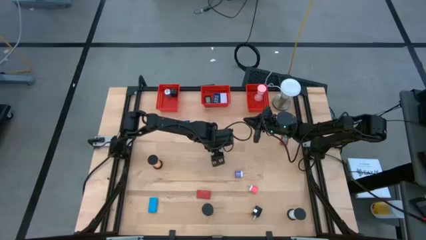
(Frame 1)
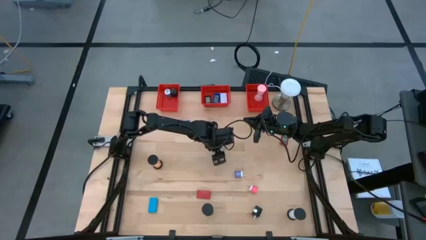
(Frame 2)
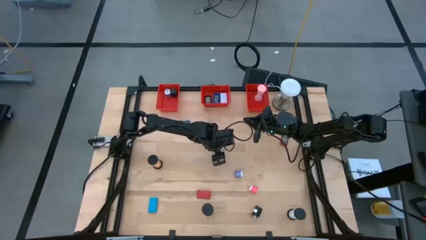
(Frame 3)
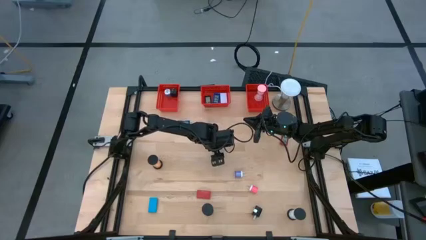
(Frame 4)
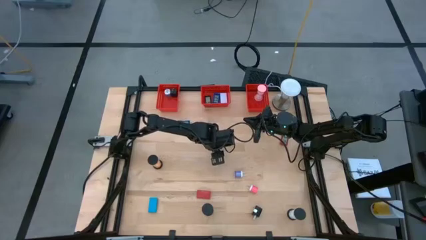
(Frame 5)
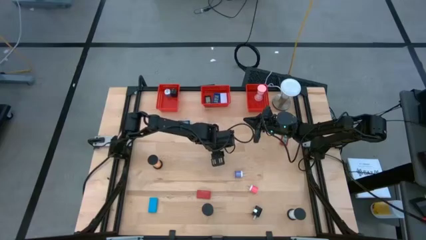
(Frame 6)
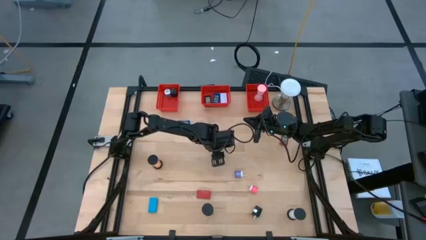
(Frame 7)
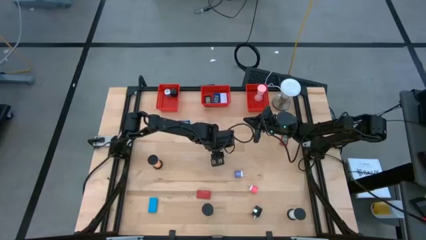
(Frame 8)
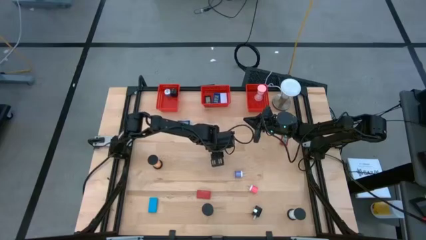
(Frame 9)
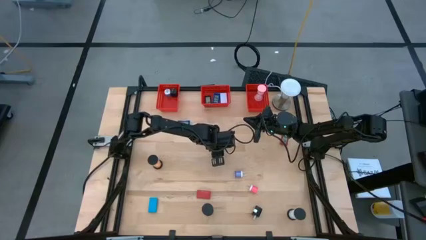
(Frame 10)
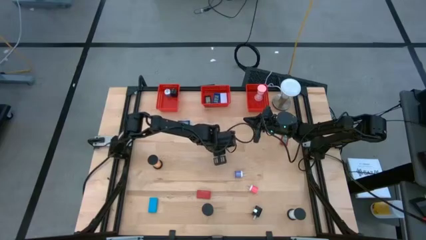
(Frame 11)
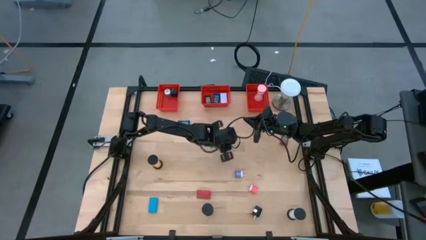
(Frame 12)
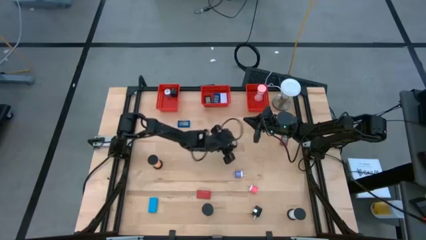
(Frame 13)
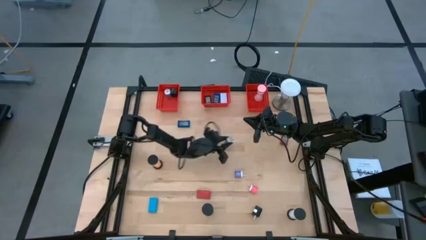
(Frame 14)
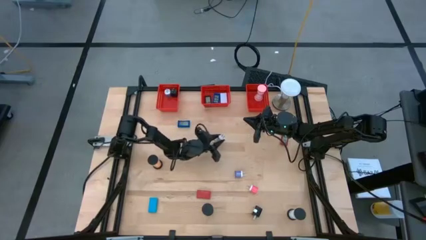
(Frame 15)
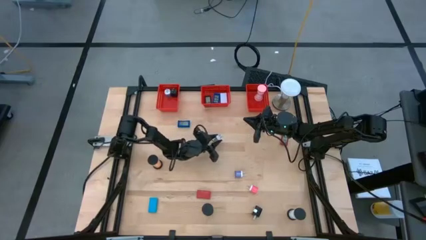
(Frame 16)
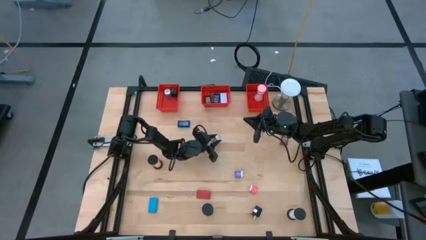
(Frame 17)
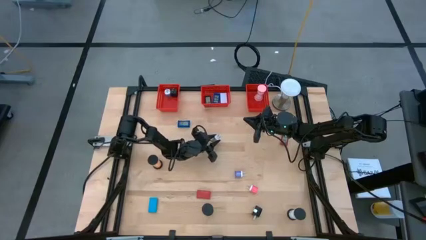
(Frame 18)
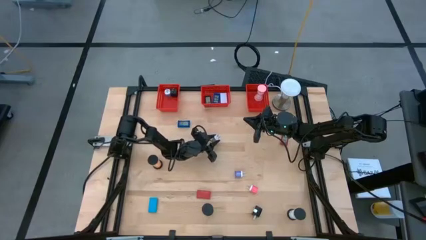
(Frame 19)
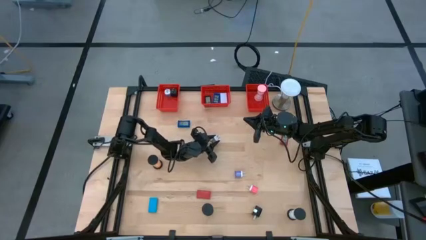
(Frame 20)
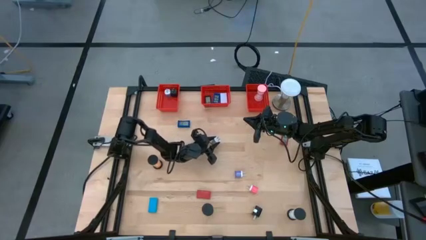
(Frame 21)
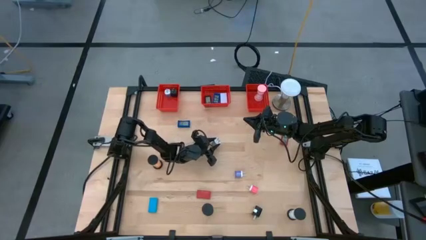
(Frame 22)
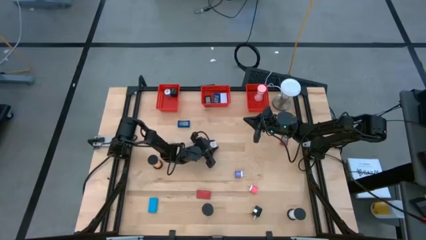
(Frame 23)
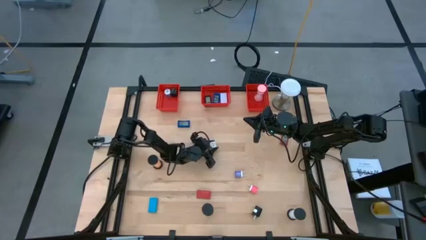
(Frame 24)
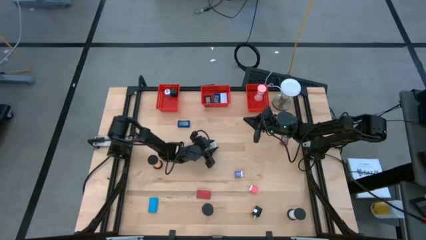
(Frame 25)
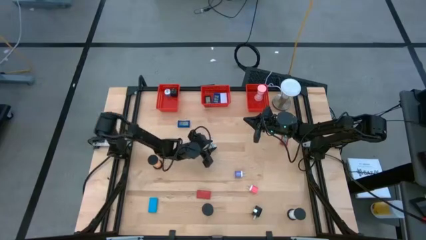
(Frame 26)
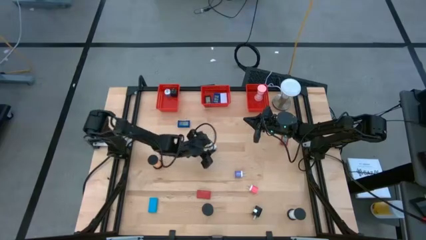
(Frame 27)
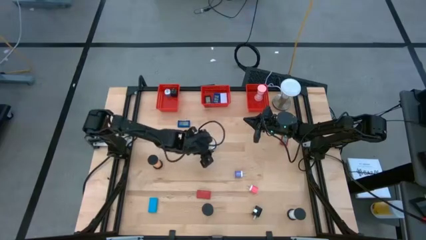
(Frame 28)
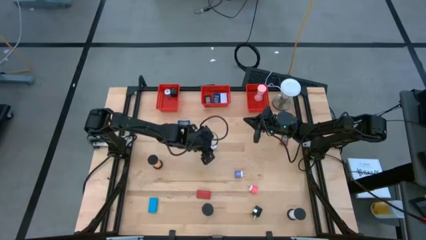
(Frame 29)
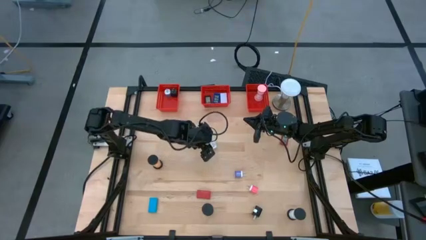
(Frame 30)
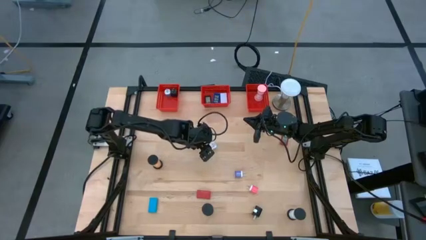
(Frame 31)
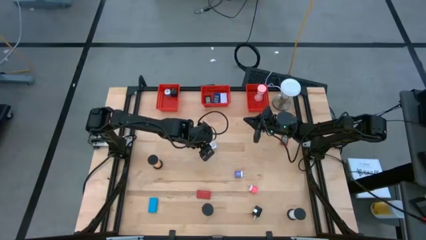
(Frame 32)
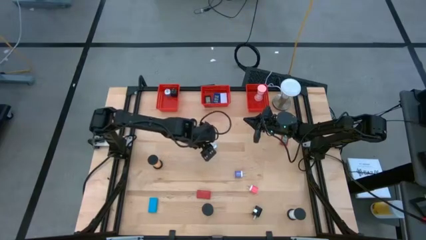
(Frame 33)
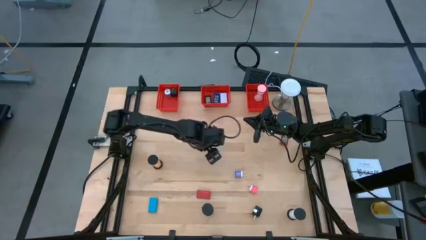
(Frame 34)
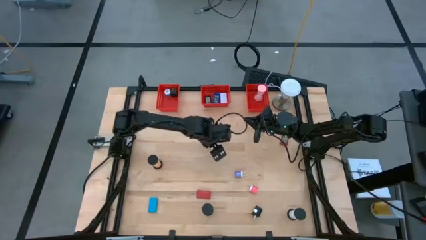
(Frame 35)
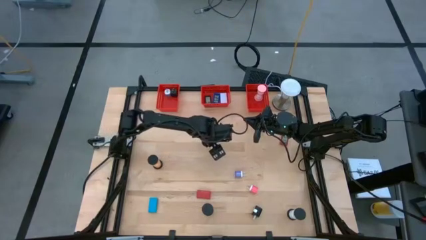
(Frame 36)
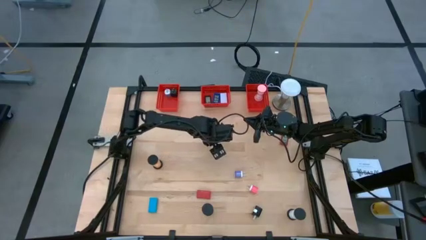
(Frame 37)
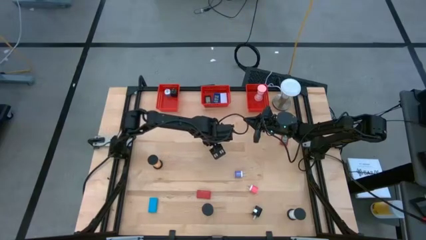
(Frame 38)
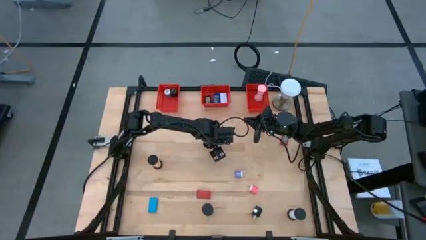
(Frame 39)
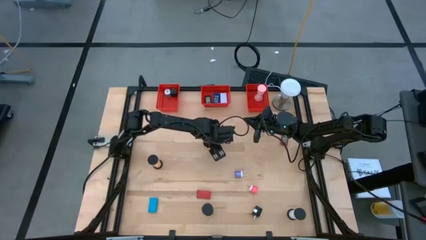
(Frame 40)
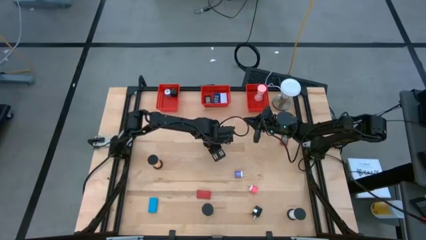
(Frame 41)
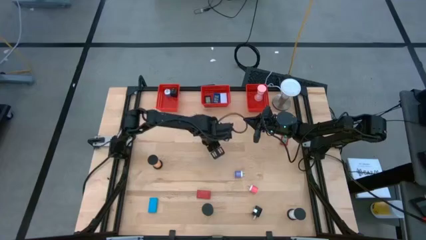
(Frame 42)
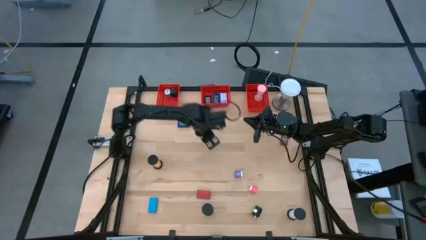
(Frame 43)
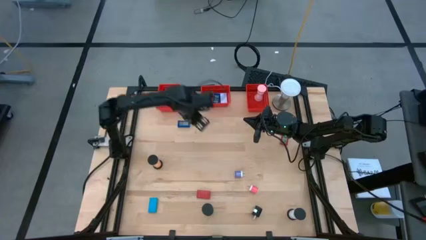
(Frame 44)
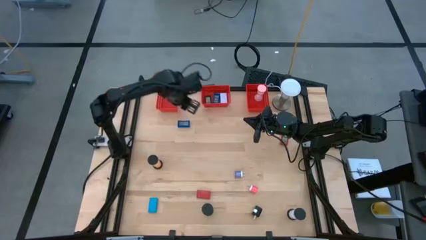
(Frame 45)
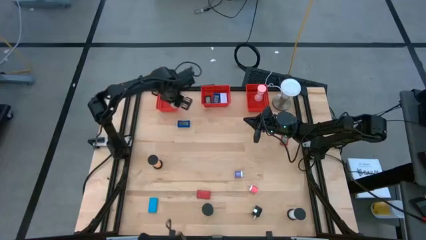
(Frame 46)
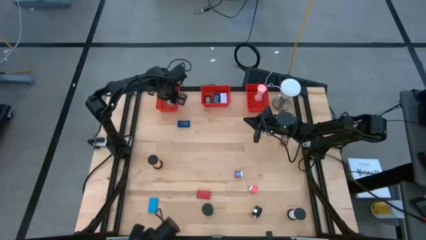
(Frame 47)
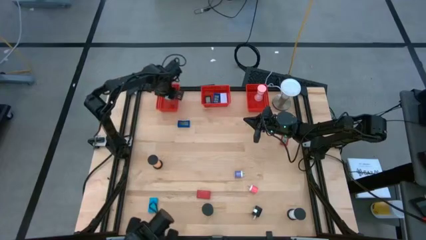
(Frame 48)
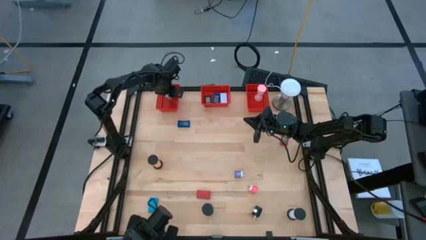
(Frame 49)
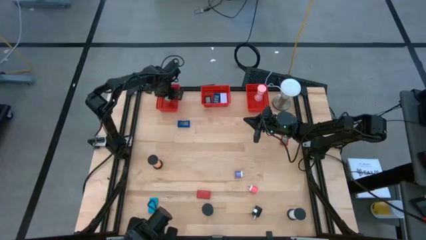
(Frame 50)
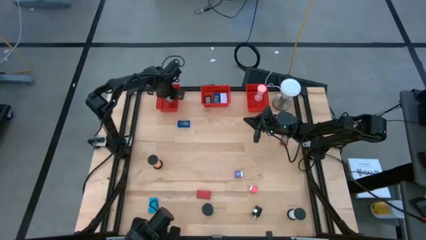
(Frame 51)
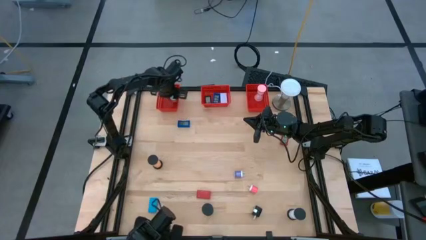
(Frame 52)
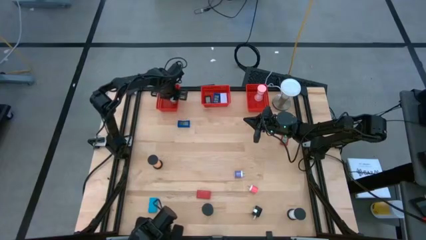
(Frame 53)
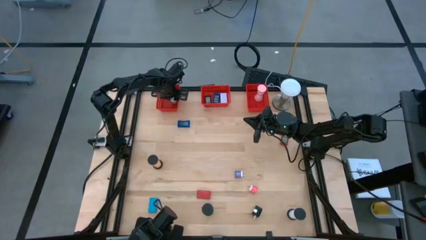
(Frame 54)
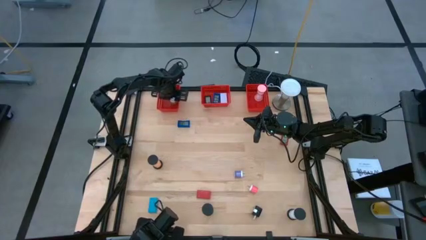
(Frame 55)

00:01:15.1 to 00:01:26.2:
Task: Pick & Place Office items
Put the green charger adapter into the left red bin
